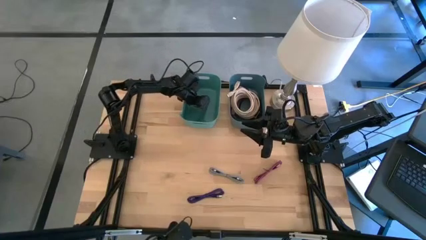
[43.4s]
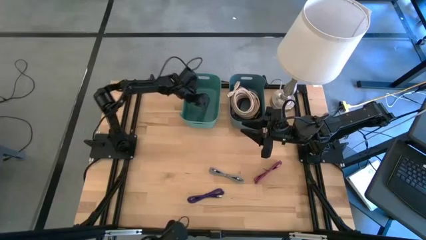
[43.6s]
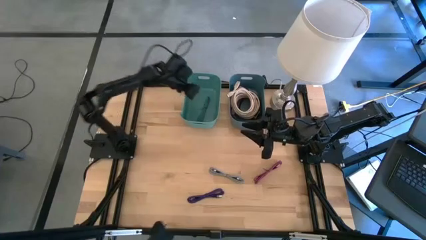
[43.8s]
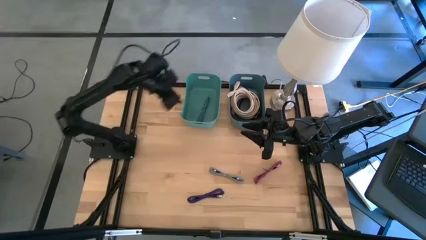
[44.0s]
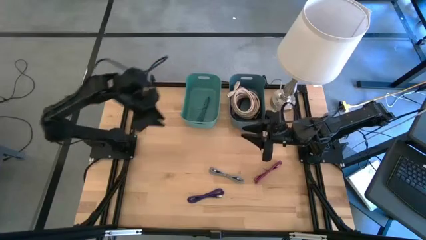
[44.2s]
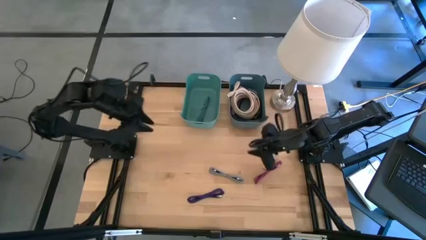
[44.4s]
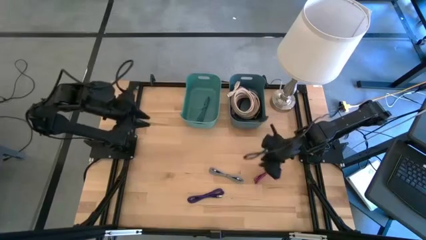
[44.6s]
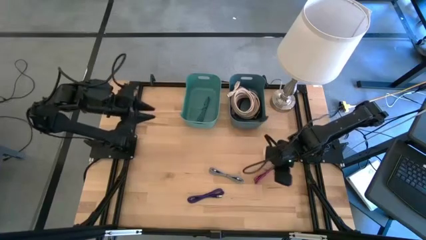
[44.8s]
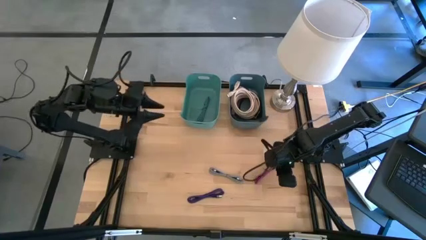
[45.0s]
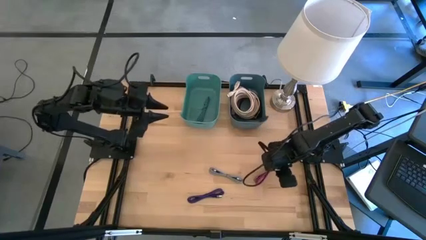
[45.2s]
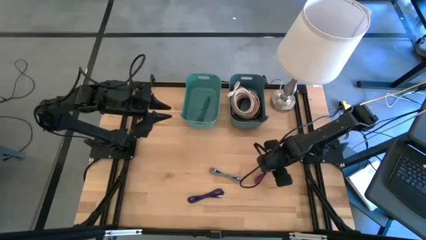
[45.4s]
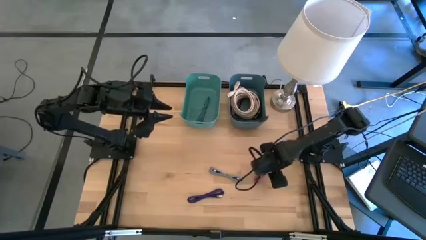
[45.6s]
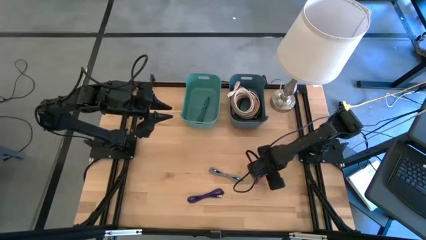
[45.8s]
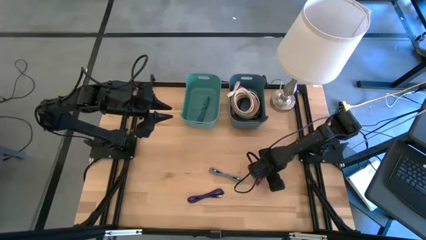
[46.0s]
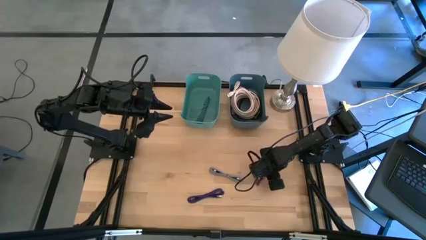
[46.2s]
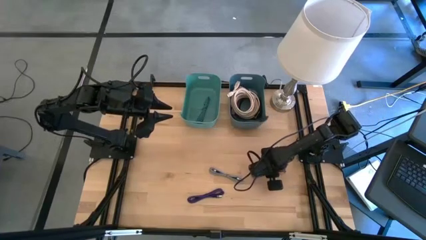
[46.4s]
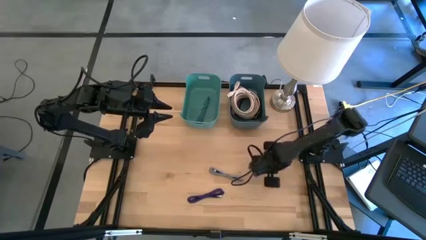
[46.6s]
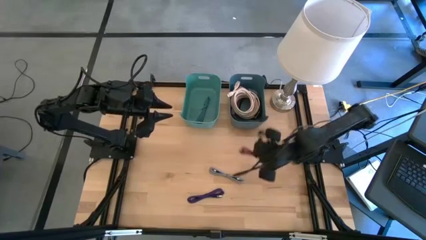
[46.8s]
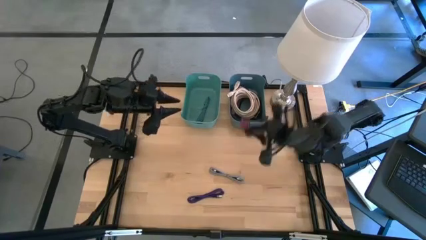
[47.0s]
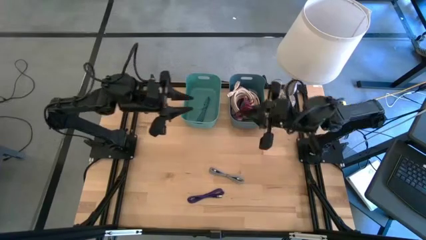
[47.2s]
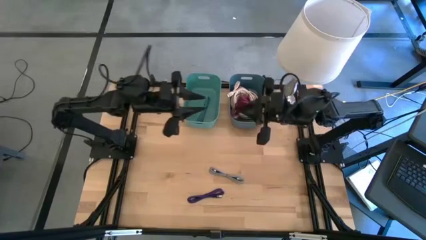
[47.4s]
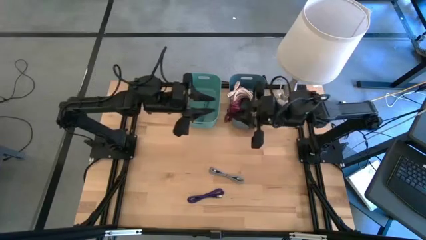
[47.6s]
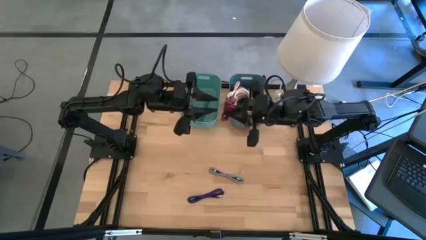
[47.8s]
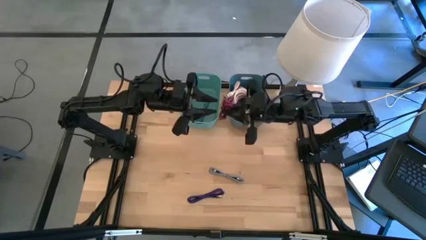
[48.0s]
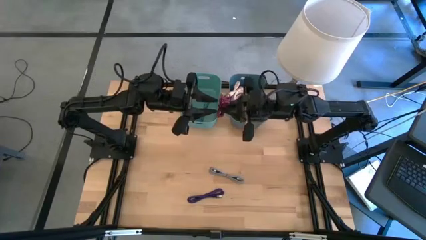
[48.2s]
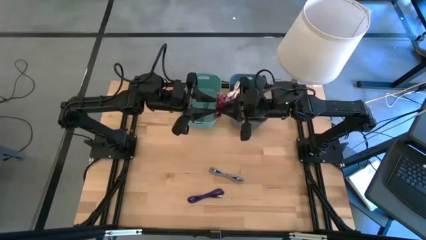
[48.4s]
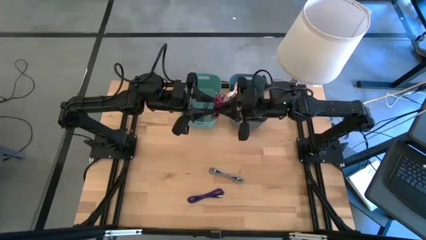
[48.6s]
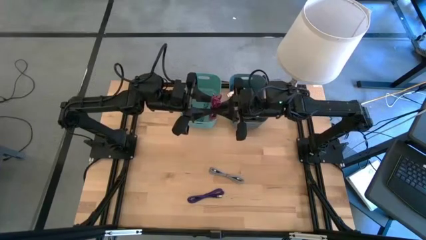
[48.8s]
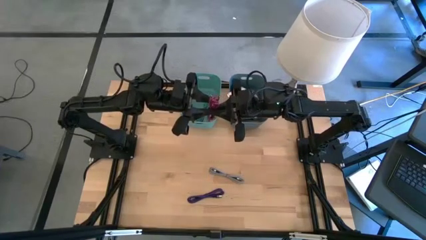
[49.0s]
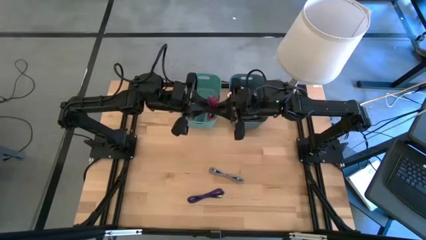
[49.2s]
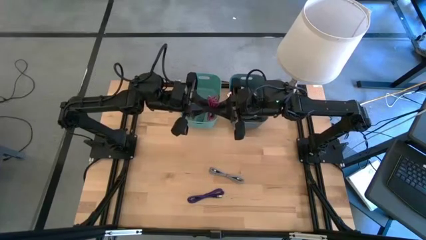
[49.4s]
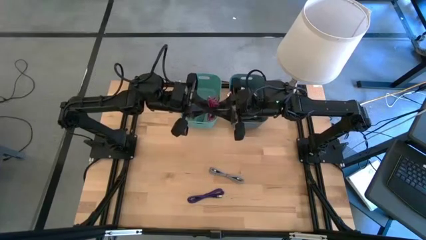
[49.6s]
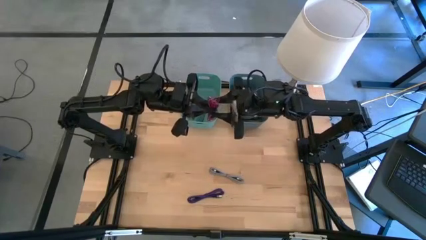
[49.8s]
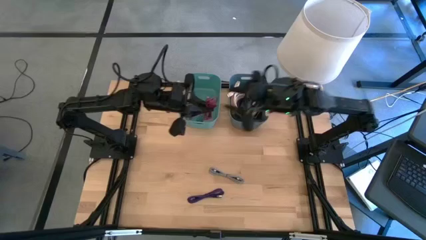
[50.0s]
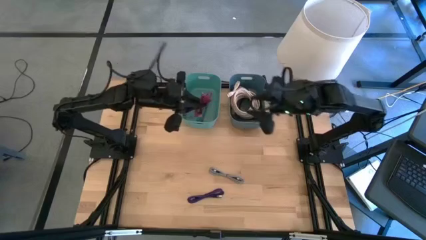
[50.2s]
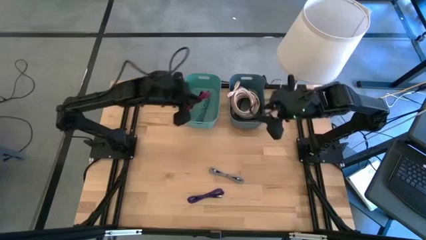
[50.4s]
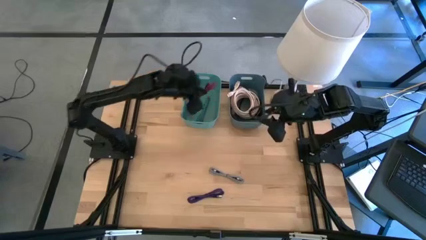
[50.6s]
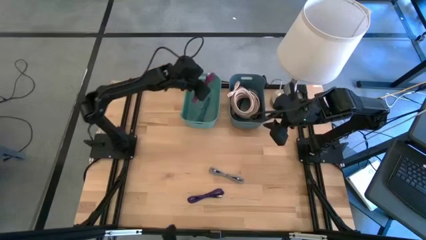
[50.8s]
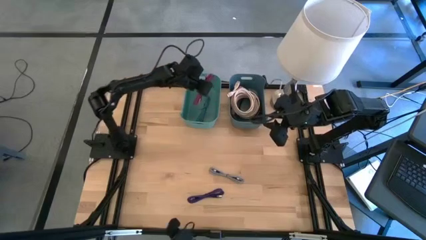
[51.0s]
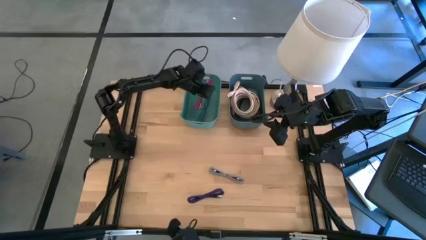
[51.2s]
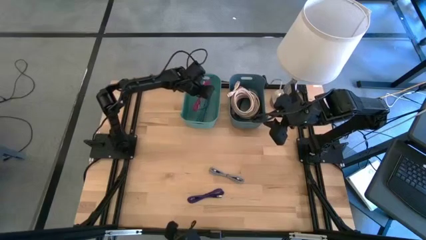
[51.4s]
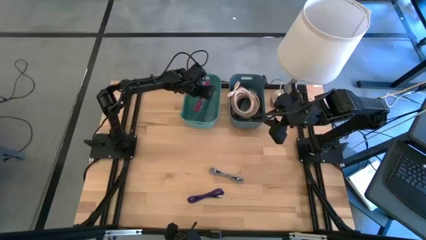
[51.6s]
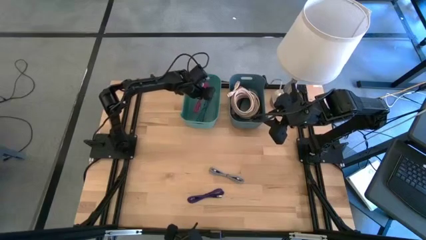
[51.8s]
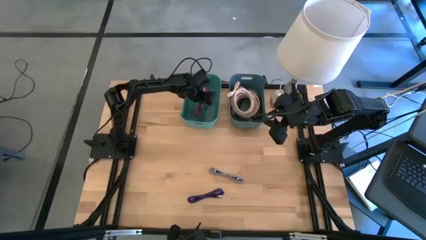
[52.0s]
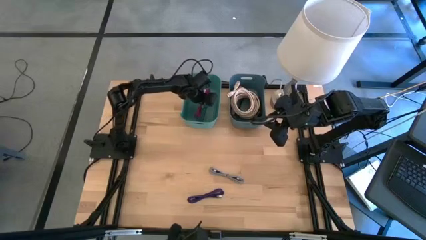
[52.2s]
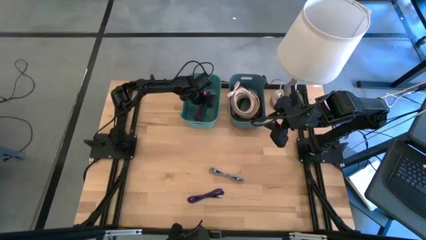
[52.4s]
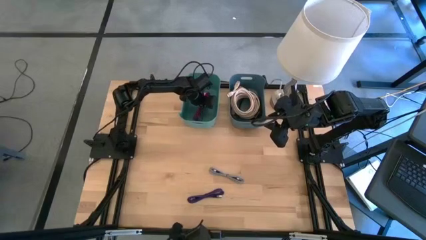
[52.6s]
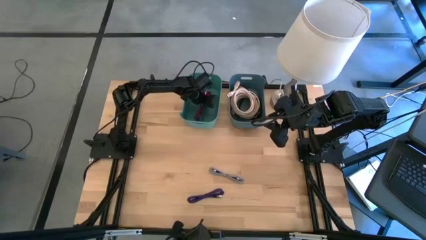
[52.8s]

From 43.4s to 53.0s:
Put the pink USB cable into the green bin

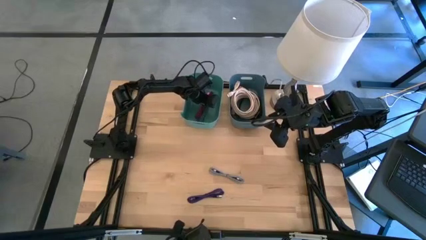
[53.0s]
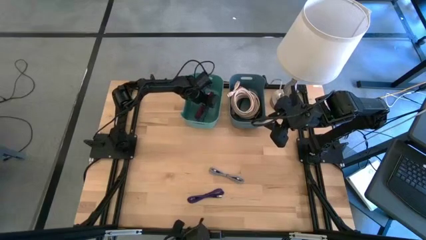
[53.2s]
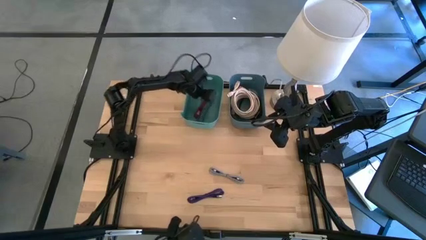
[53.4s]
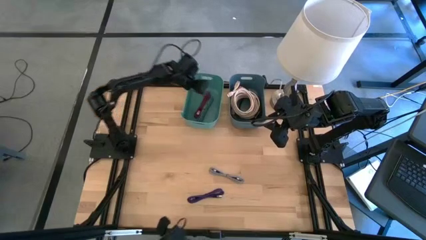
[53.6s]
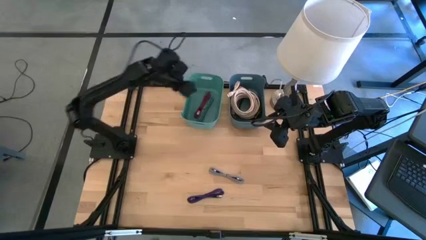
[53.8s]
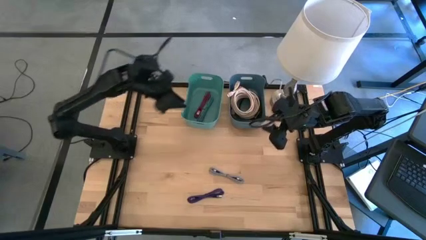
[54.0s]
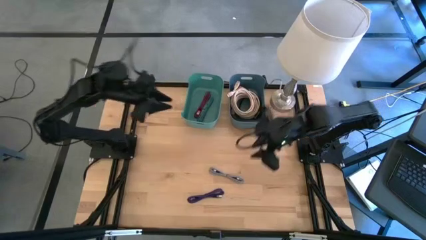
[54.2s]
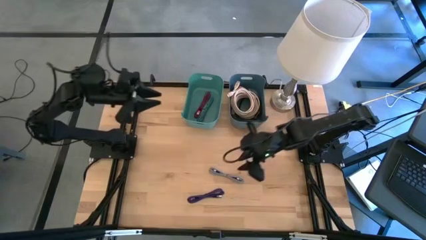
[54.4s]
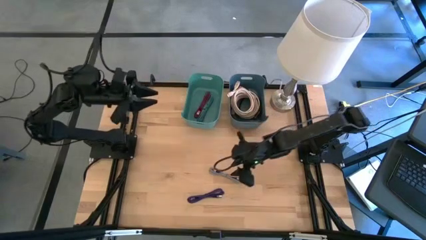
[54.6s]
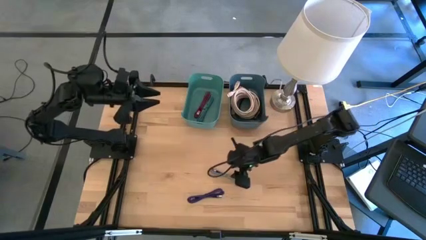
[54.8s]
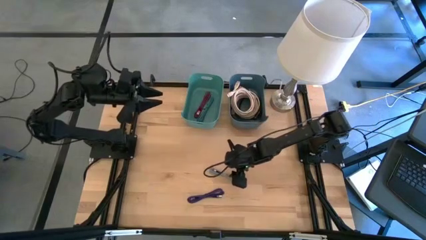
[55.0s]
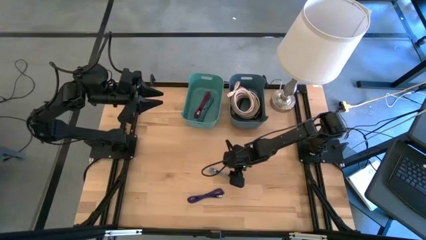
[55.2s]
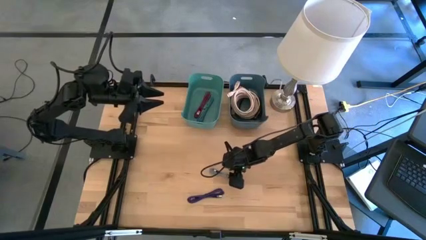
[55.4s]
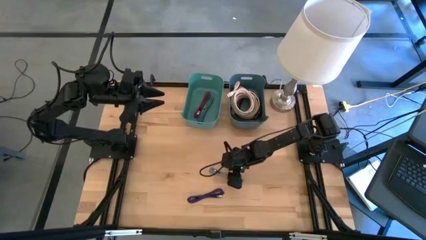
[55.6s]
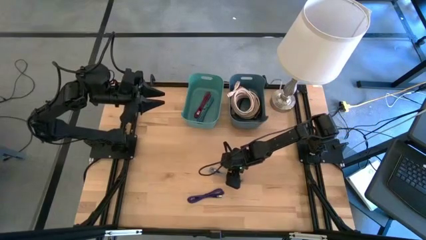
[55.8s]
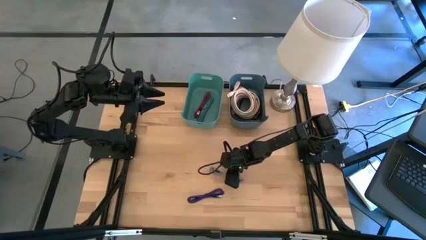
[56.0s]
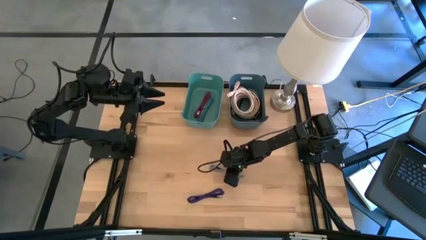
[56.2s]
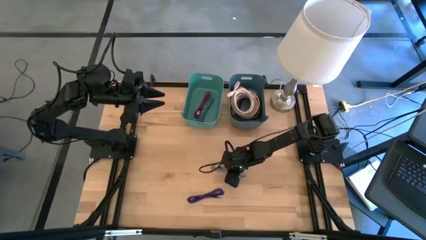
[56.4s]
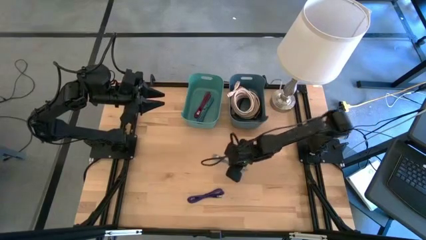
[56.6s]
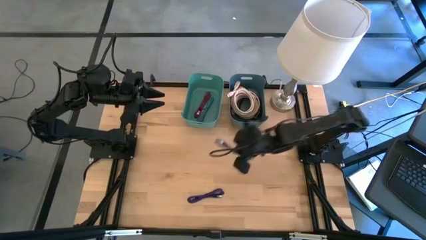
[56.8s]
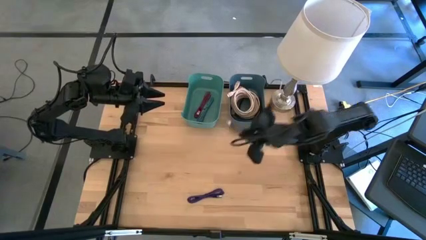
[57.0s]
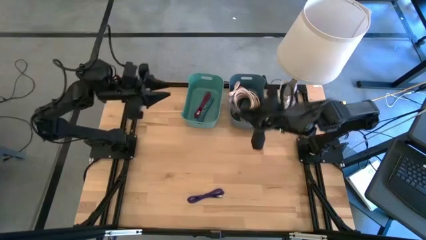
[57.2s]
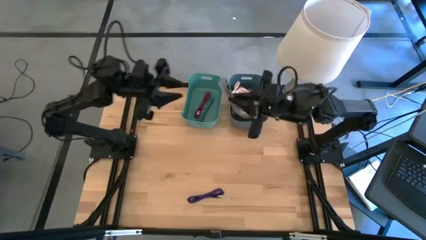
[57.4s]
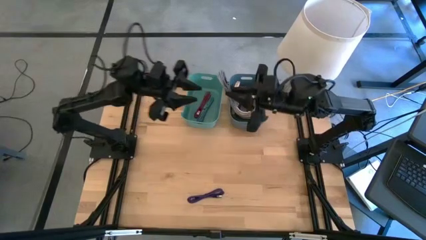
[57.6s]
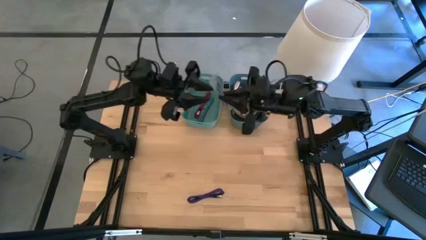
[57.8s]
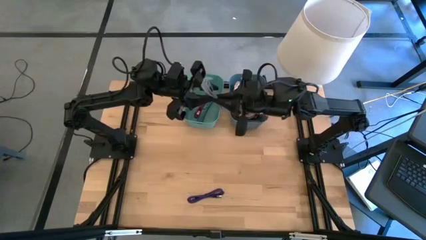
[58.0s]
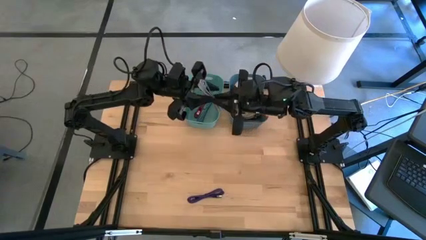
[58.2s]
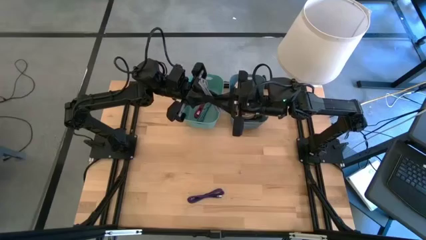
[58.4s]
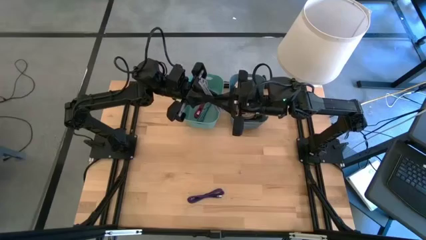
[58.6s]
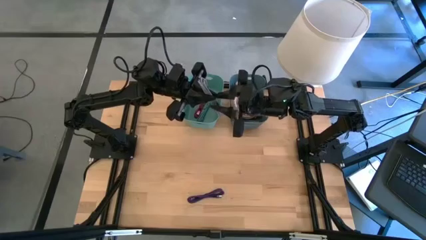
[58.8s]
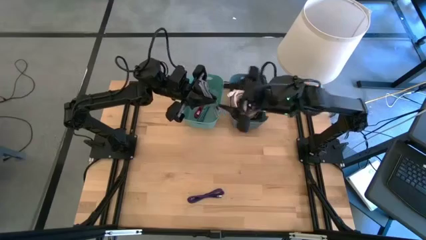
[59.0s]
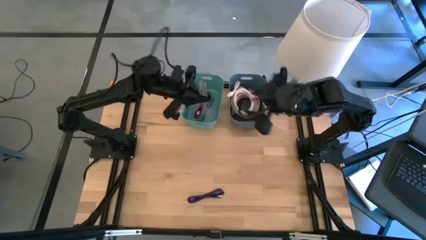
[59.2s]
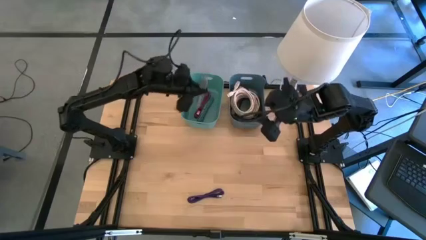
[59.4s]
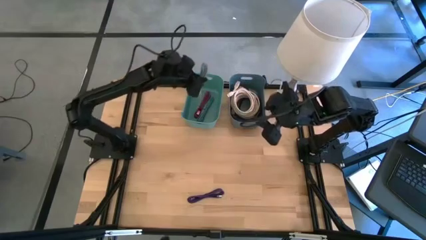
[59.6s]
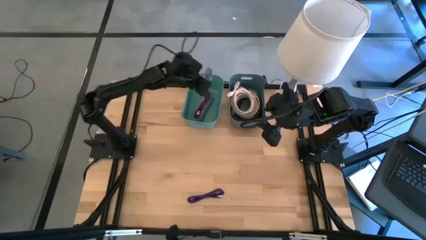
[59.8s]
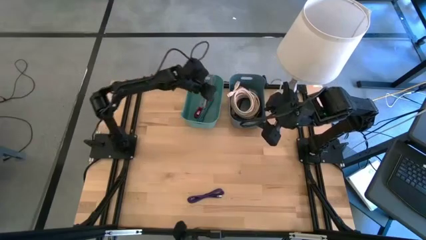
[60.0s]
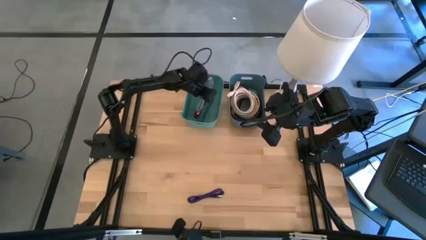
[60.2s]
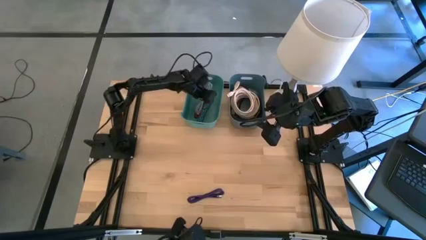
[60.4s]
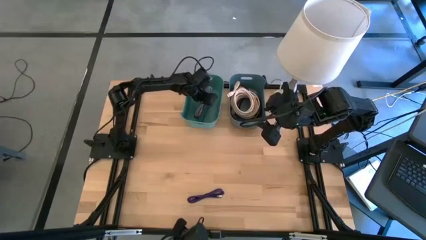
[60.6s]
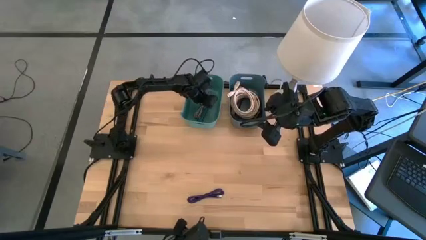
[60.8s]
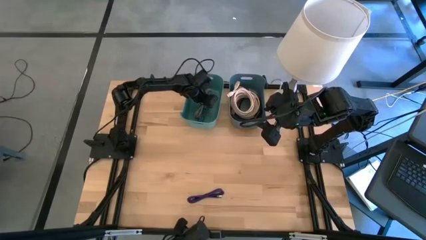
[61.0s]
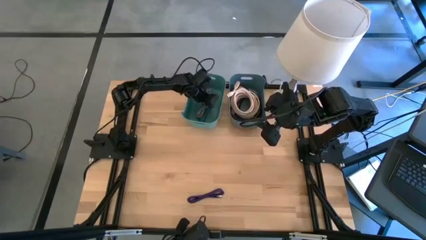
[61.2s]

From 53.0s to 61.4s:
Put the white USB cable into the green bin
